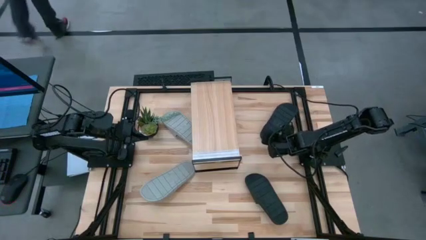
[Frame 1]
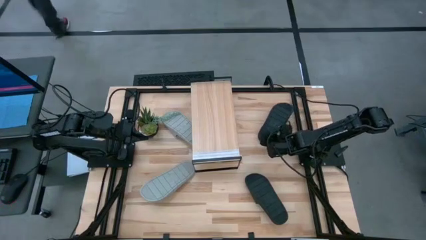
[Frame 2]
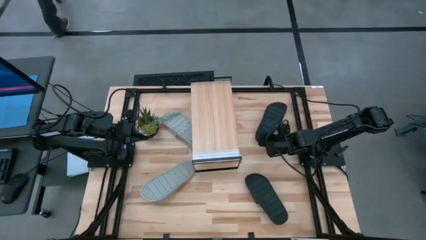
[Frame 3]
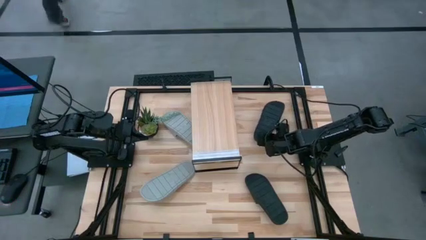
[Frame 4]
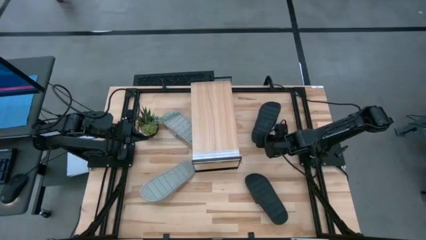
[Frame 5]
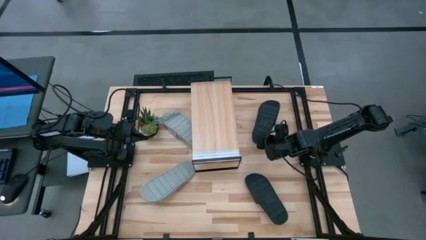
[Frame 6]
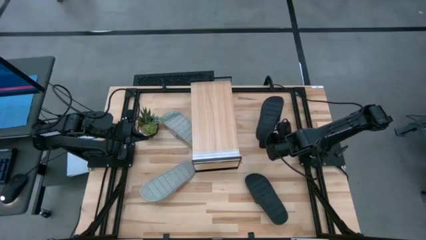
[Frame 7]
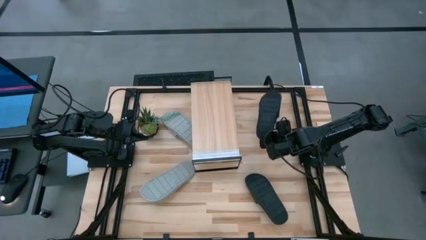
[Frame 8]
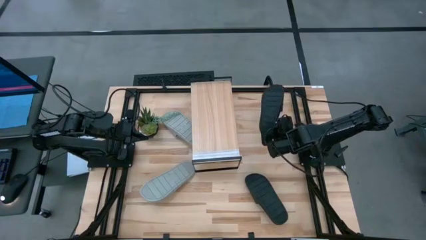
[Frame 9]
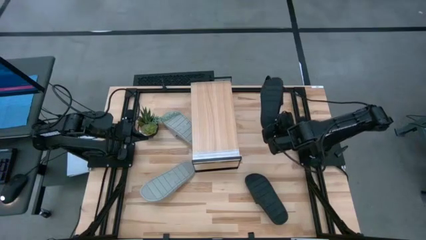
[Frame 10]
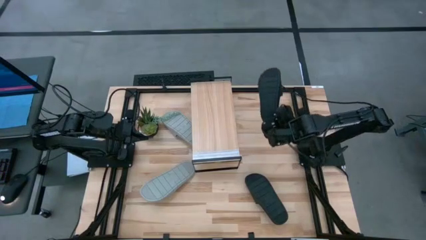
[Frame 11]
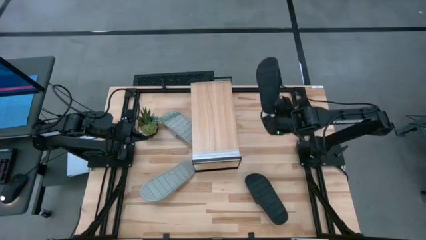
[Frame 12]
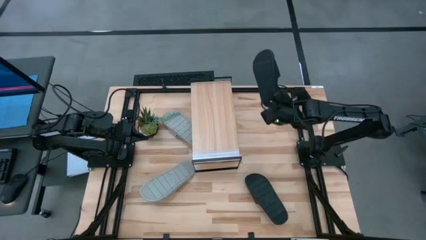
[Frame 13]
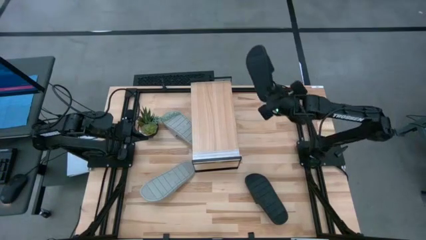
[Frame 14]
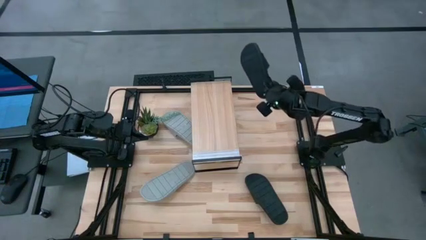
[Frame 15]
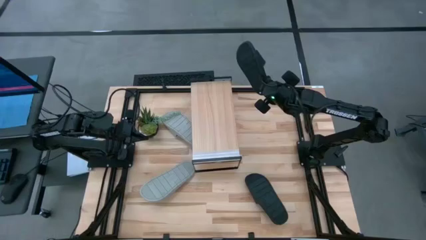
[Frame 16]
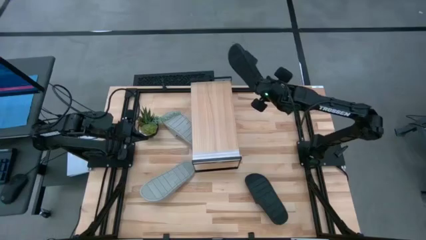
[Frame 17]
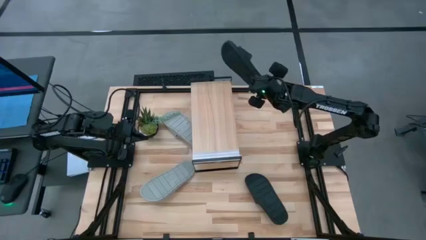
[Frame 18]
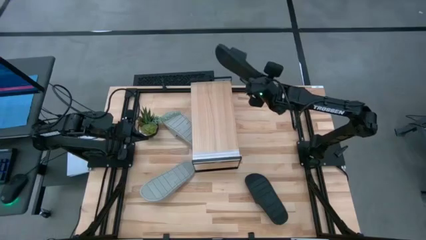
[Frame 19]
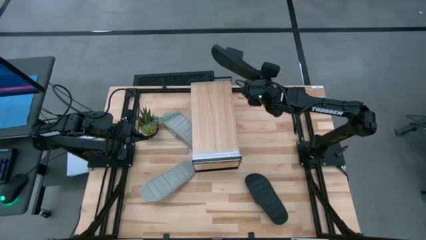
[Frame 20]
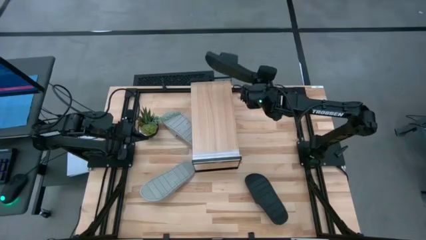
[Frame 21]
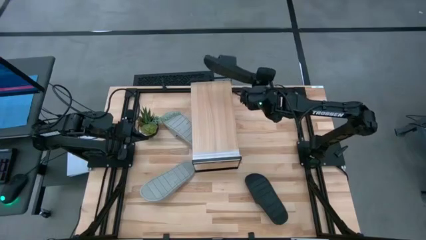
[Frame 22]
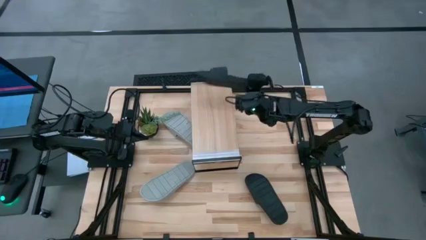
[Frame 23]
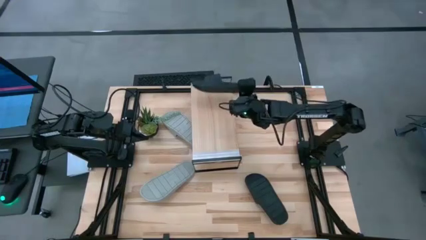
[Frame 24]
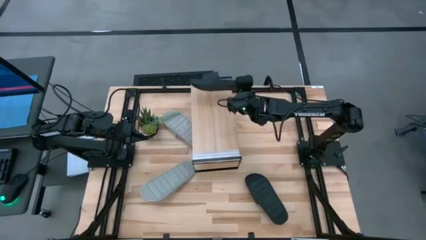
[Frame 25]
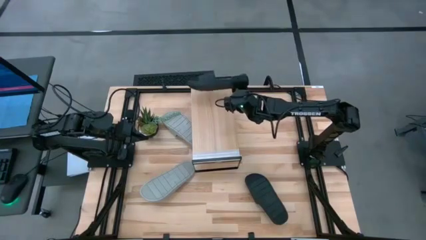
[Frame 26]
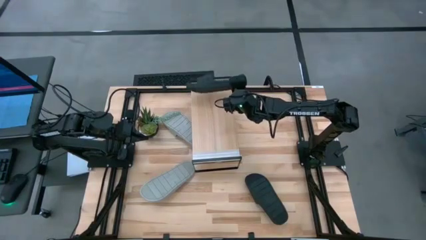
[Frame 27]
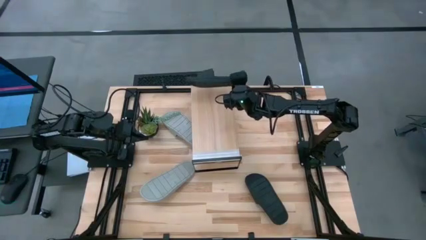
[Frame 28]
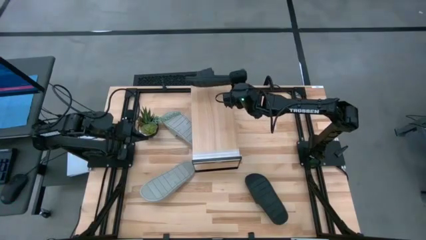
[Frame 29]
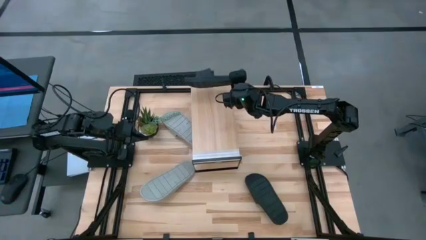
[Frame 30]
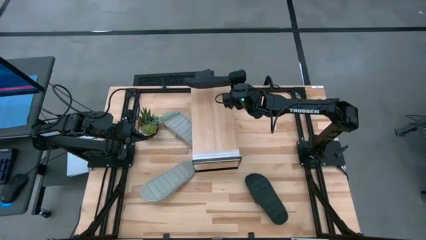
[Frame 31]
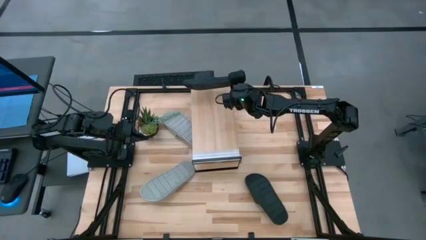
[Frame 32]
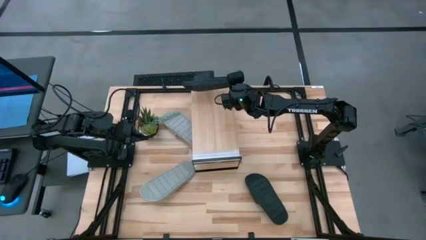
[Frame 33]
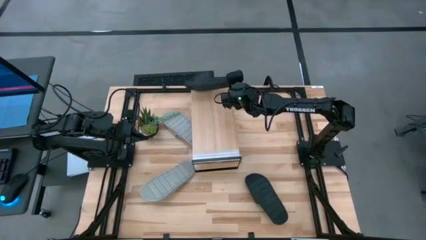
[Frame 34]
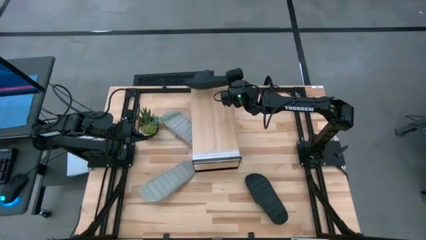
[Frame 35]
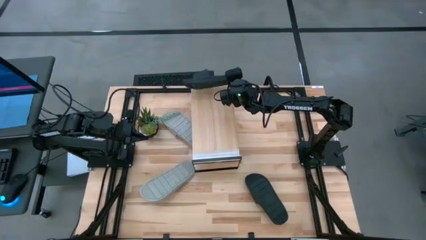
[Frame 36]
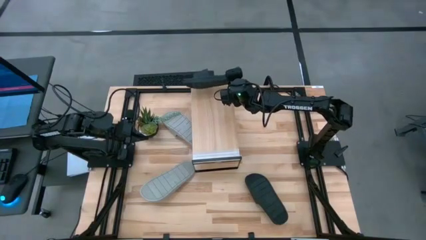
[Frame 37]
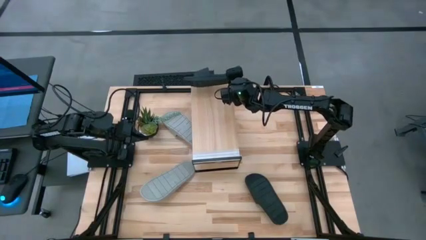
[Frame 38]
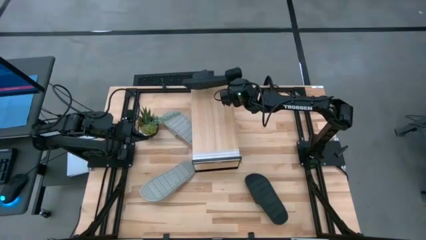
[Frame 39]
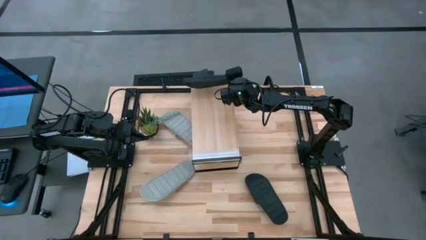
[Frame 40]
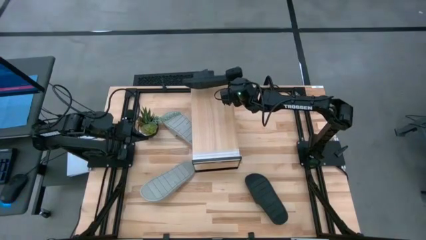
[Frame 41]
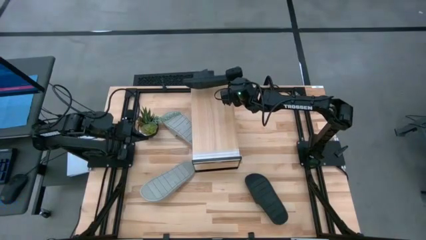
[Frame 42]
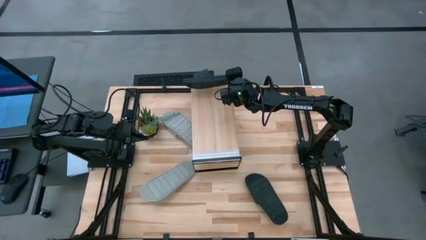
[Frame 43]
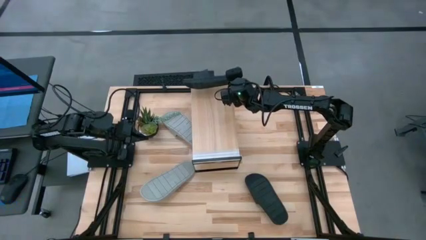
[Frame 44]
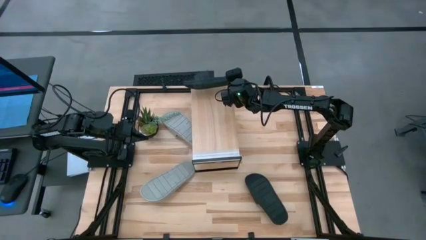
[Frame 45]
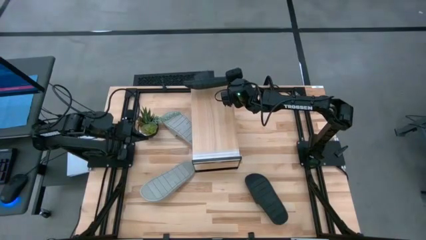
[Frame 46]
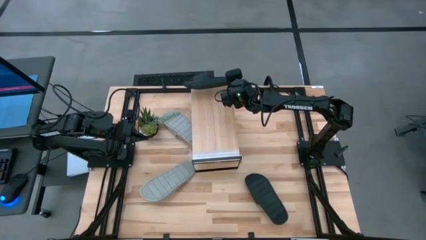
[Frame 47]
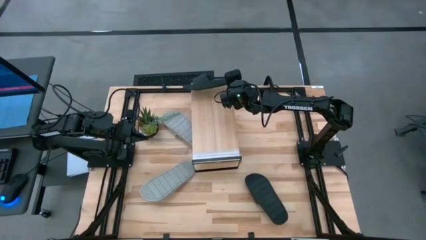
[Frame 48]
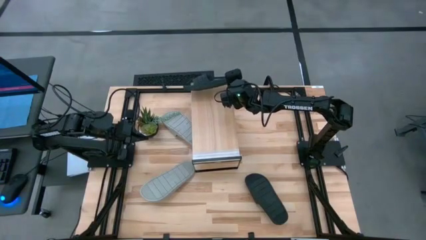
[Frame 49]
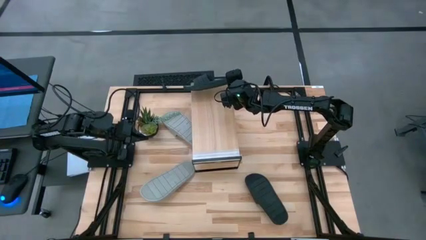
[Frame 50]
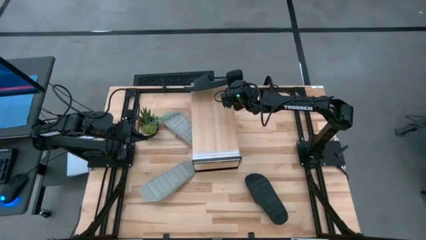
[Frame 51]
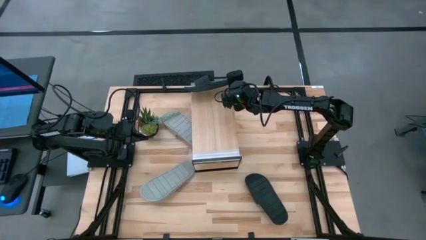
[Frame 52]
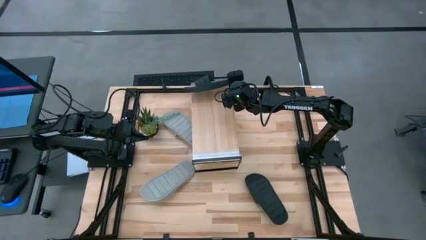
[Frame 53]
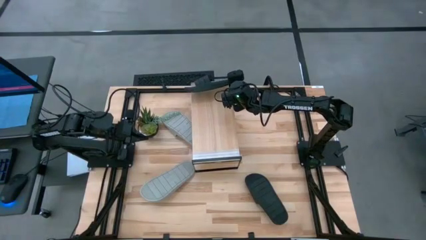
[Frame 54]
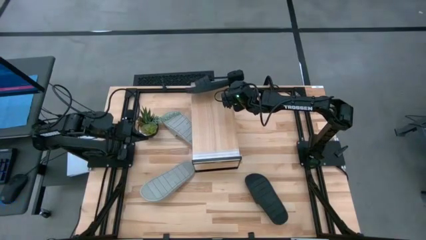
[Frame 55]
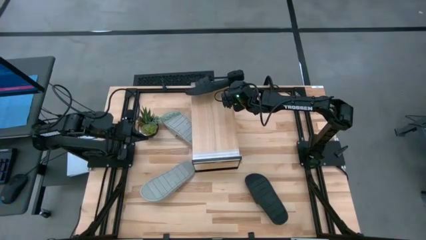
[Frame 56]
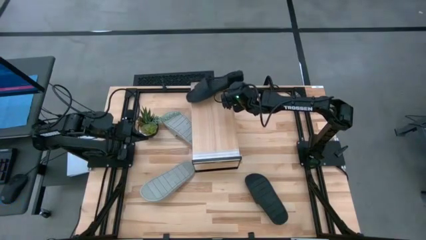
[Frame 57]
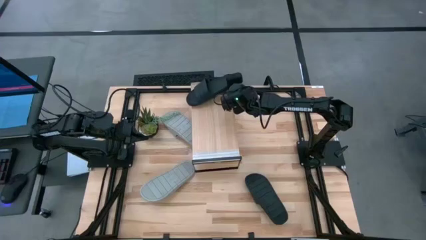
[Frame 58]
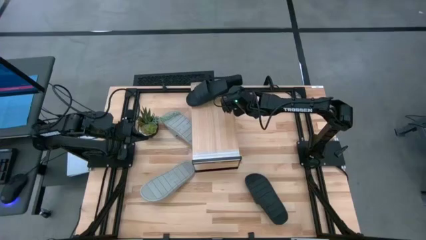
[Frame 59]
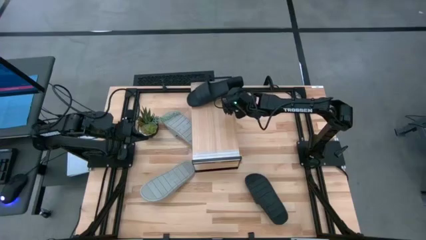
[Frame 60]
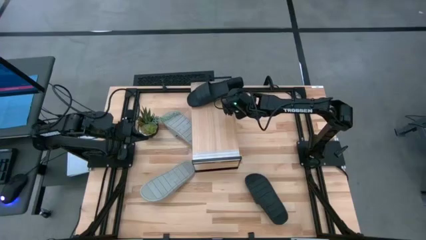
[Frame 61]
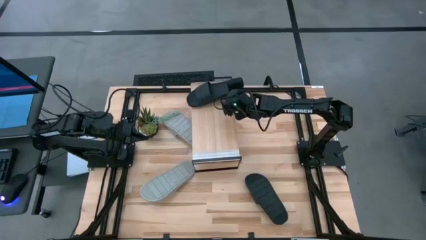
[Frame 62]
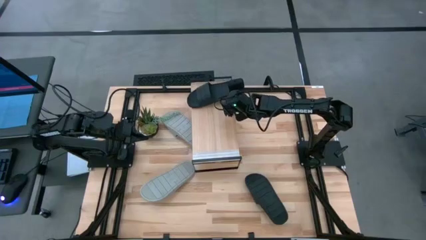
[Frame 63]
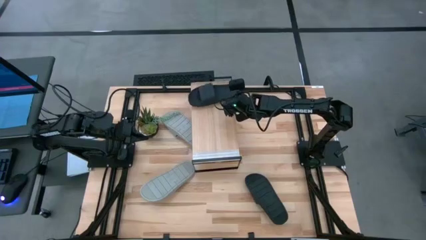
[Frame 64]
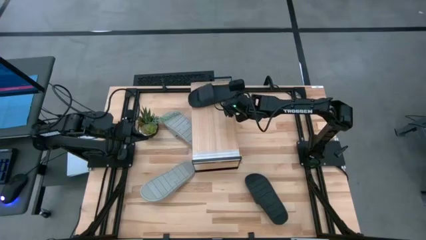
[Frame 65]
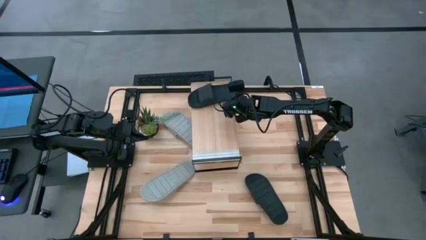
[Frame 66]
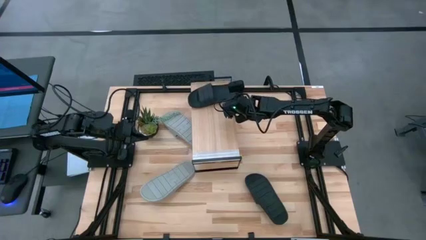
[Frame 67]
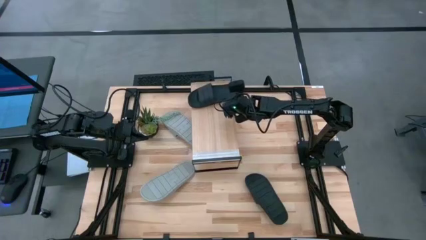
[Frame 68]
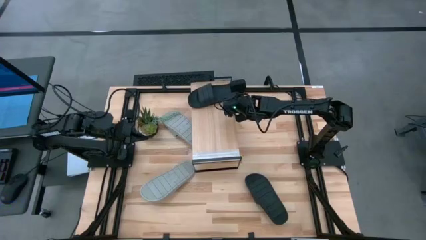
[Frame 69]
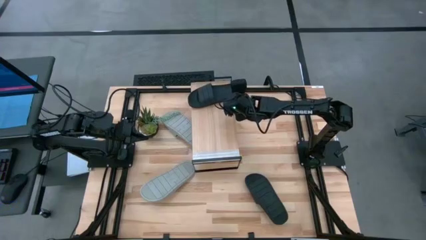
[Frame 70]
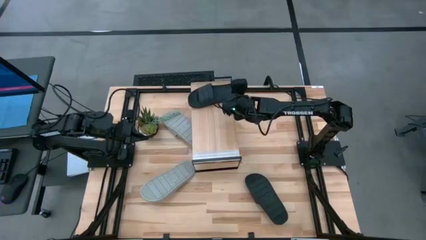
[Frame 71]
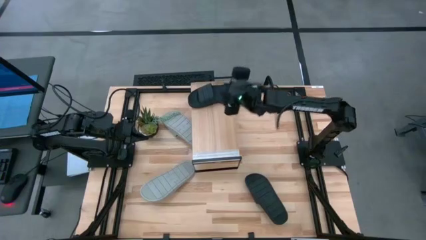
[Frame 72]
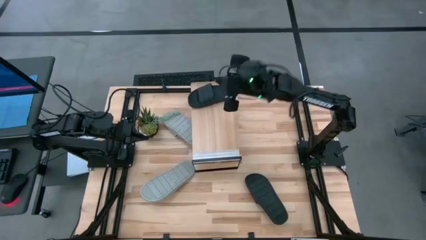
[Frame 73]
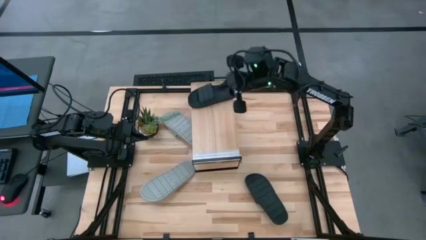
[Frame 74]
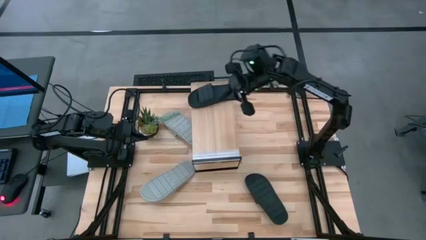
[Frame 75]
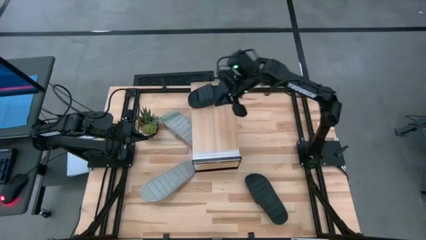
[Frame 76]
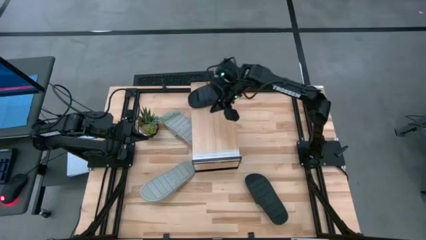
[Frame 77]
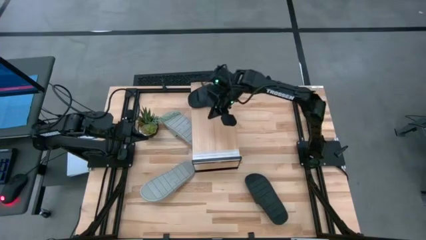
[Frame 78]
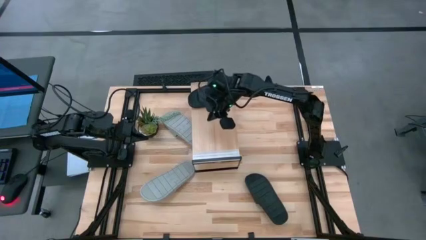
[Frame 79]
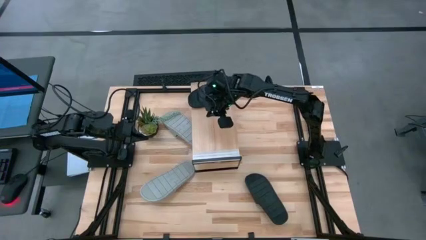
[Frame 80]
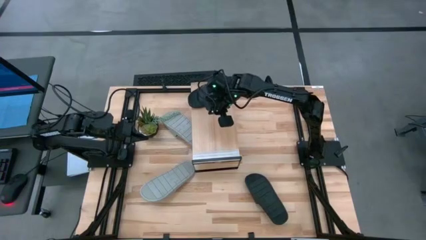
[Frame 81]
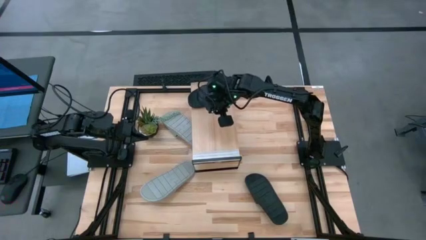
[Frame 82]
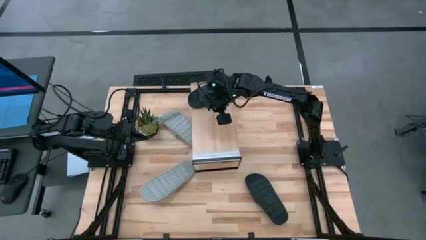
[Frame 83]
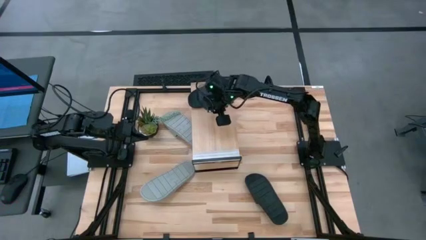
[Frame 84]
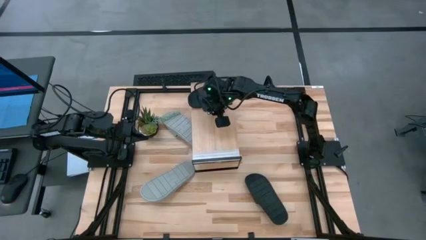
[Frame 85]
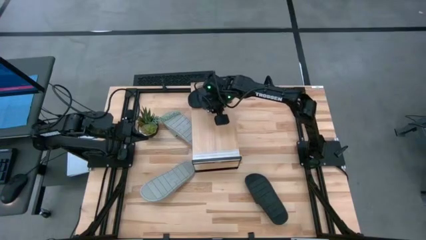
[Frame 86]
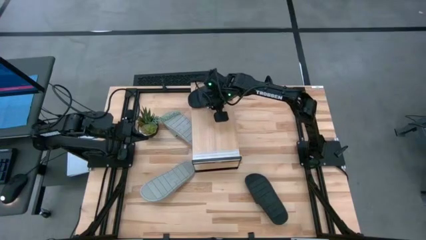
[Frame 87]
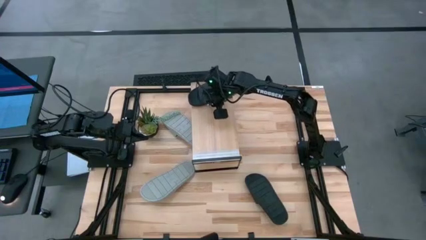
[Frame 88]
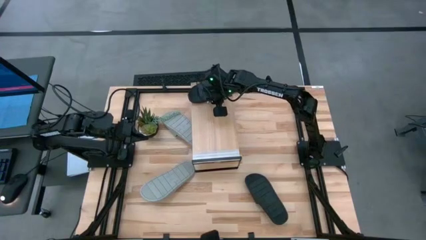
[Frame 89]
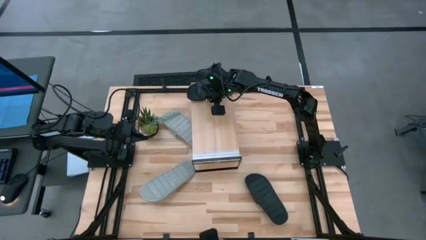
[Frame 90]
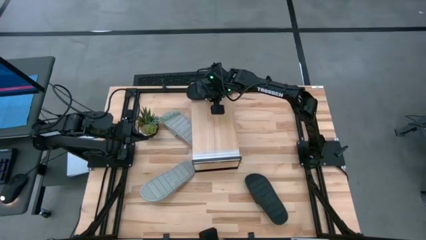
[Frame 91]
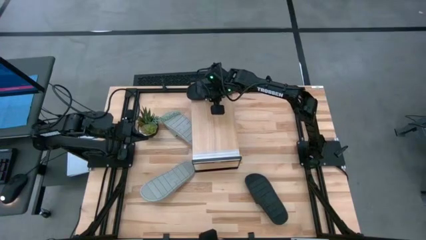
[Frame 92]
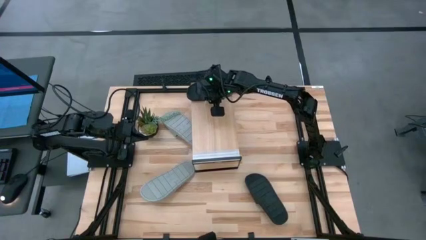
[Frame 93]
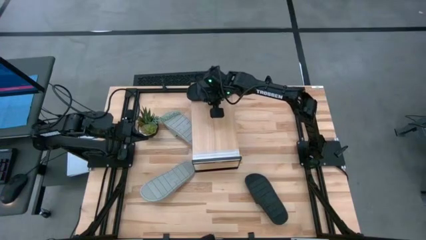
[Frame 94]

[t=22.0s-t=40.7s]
Task: Pick and place slides into the shelf
Put the top black slide on the shelf
